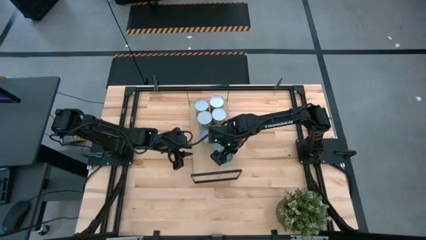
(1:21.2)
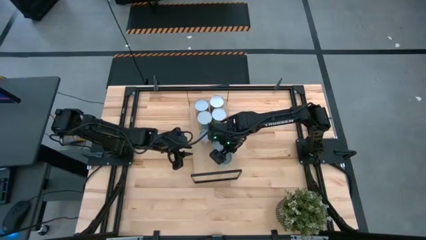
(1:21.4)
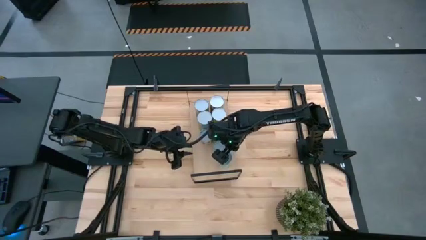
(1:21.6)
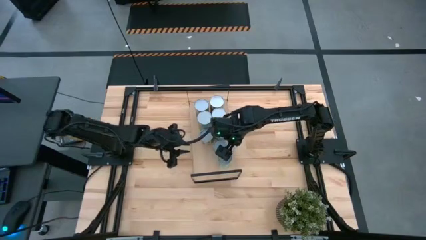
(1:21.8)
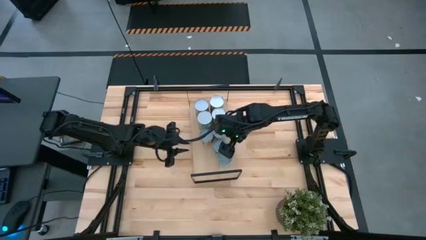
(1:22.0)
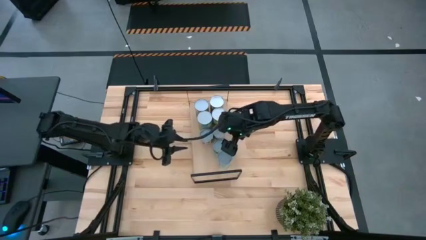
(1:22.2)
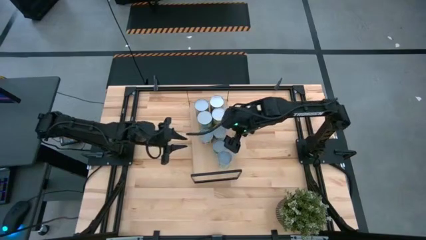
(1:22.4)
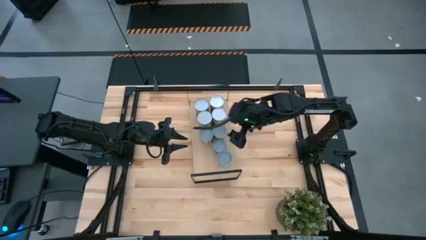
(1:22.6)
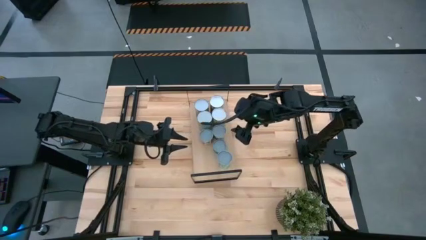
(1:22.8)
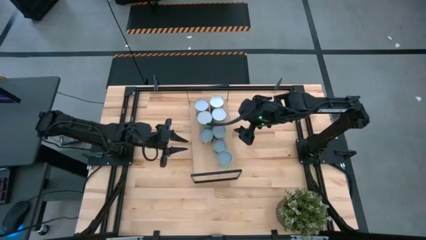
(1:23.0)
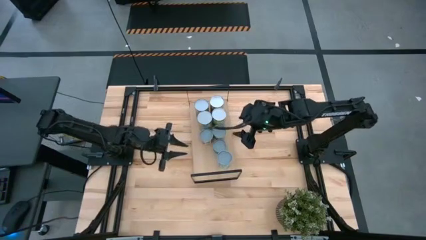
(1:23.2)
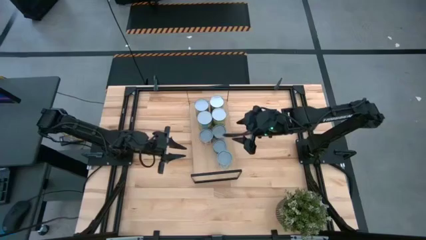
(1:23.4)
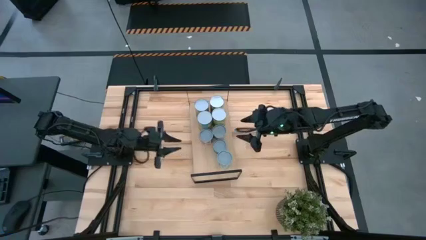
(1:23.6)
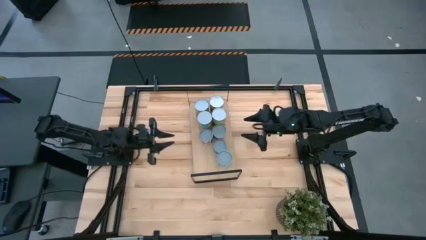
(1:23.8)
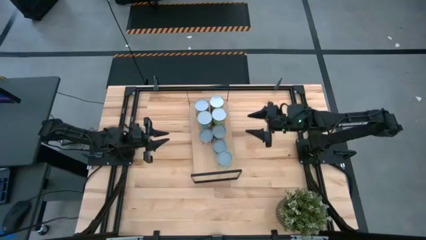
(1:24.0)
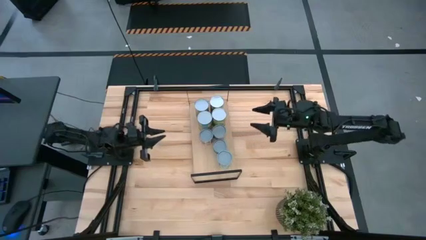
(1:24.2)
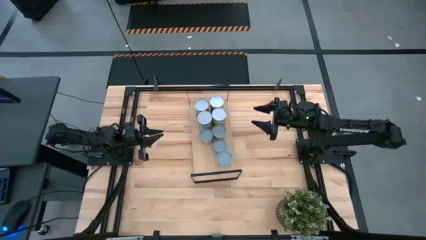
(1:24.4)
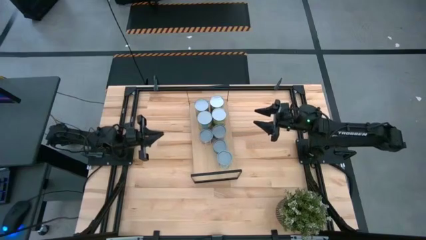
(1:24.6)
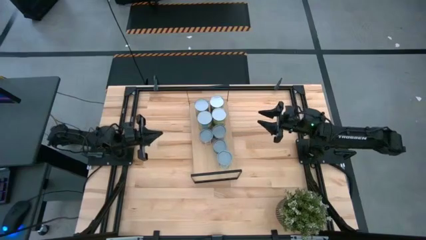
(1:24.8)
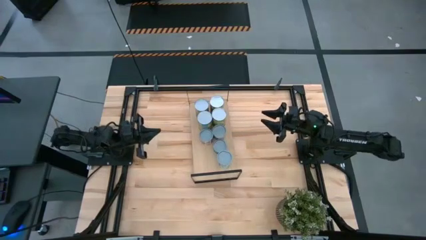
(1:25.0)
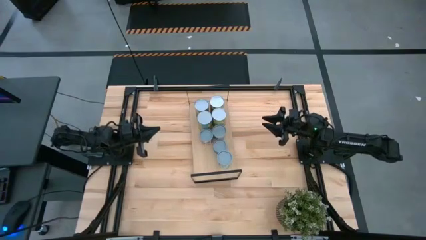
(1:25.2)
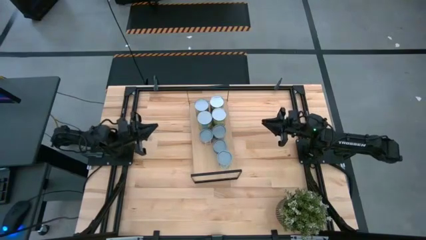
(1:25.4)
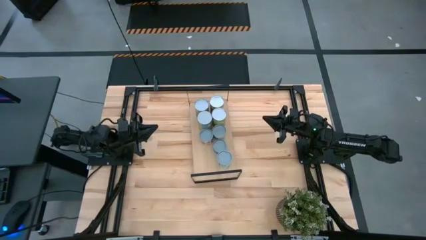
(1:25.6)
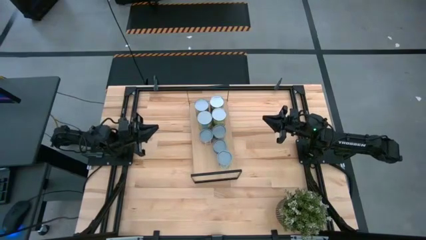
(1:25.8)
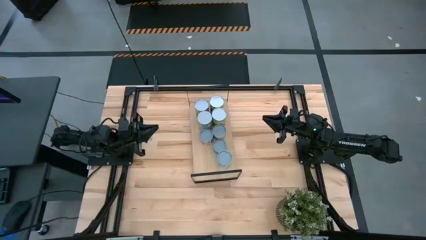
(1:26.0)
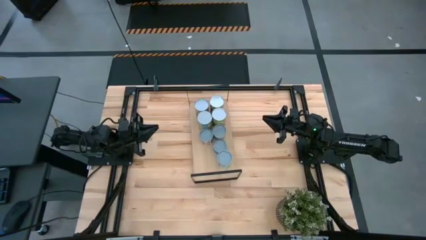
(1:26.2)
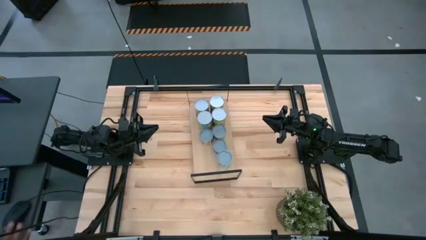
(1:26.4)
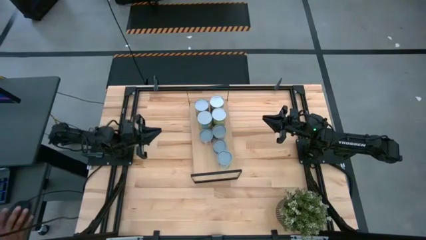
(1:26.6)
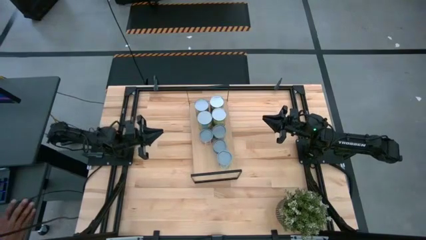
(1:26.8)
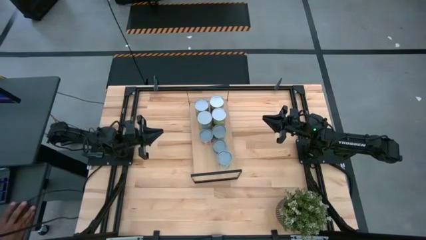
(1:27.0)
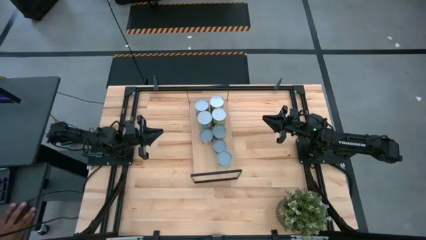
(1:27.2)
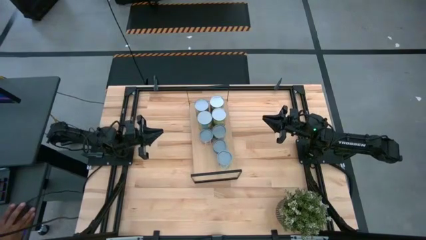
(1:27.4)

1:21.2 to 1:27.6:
Task: Pick and place cans onto a shelf
Return to Home Position

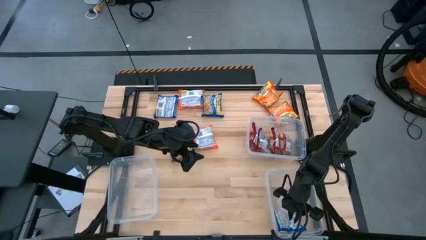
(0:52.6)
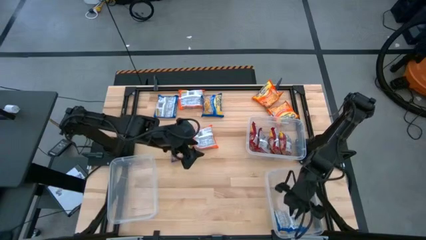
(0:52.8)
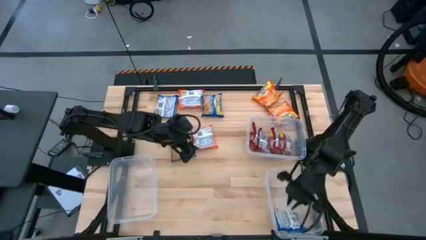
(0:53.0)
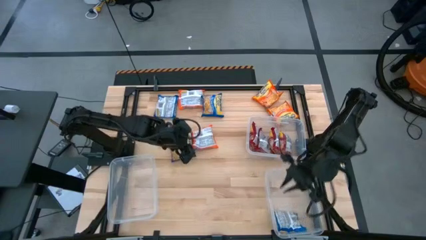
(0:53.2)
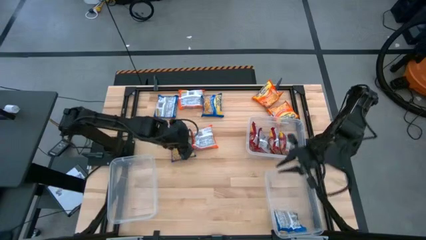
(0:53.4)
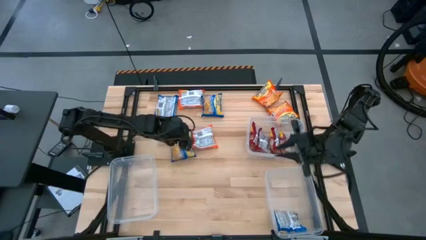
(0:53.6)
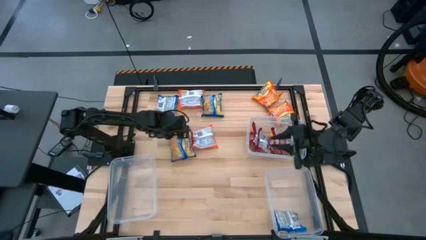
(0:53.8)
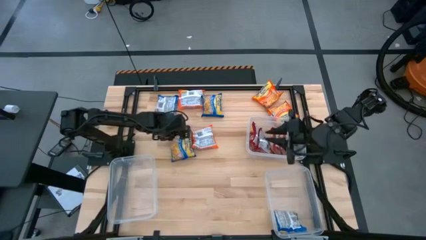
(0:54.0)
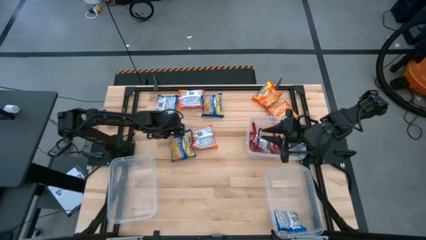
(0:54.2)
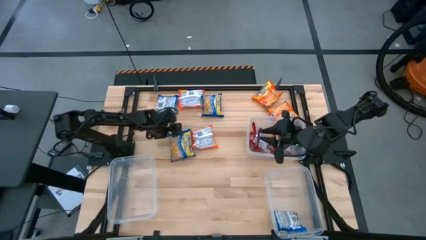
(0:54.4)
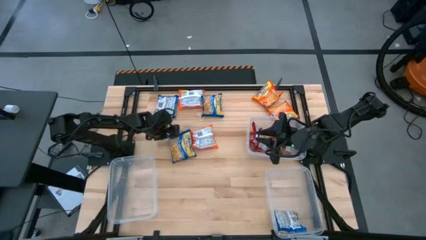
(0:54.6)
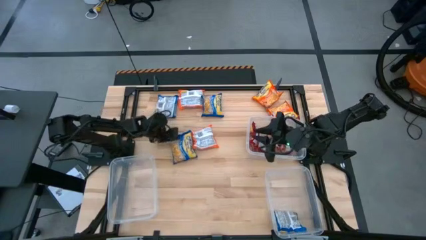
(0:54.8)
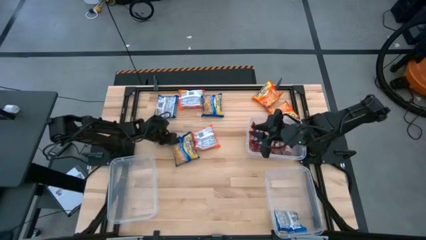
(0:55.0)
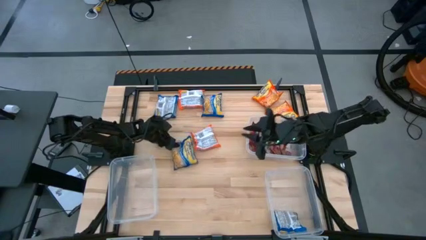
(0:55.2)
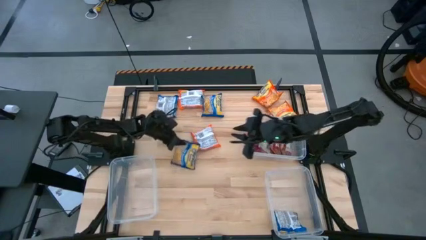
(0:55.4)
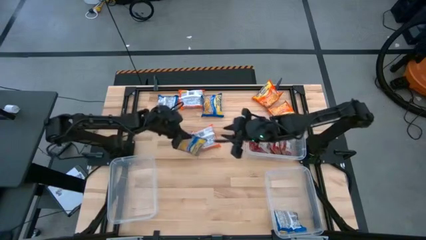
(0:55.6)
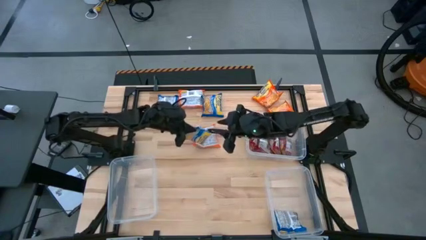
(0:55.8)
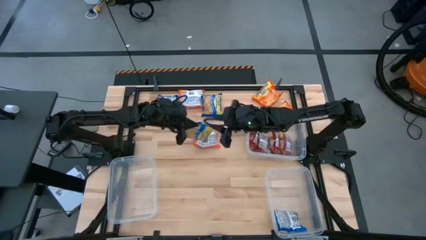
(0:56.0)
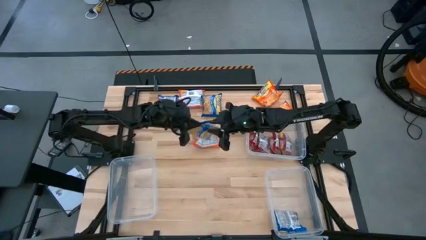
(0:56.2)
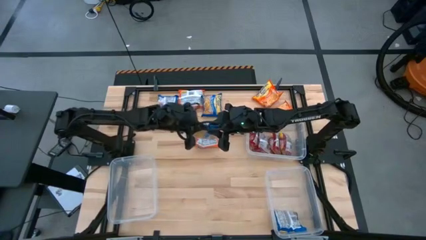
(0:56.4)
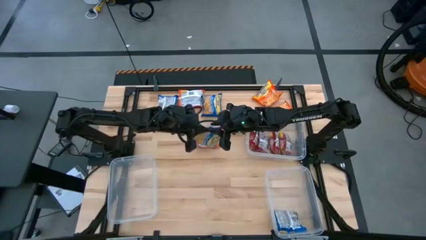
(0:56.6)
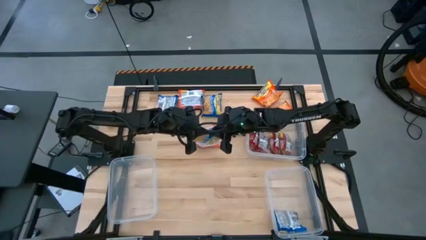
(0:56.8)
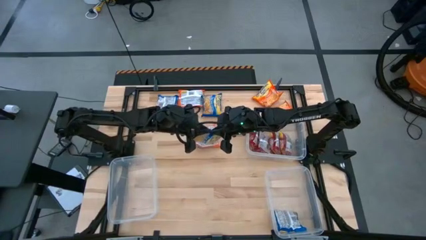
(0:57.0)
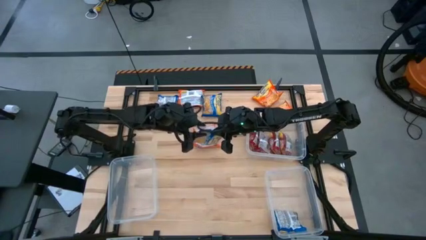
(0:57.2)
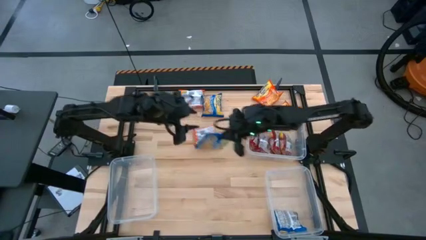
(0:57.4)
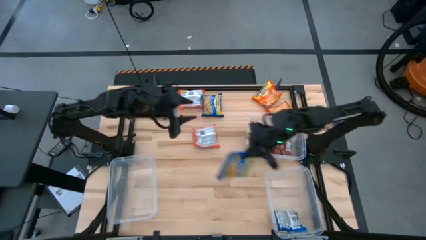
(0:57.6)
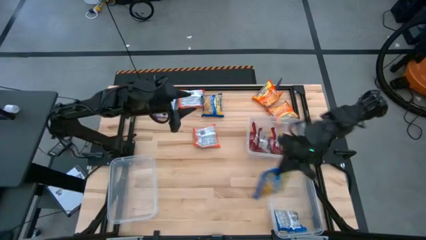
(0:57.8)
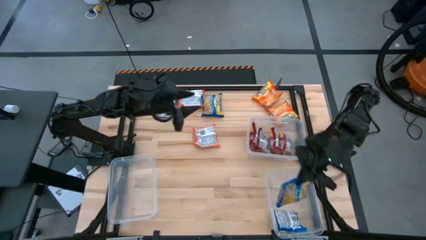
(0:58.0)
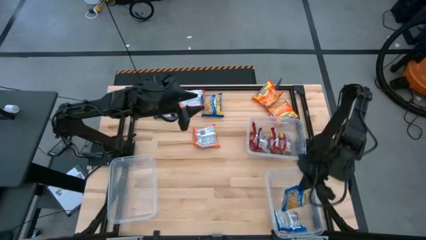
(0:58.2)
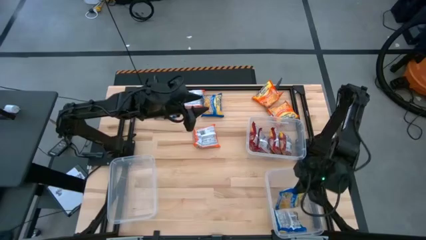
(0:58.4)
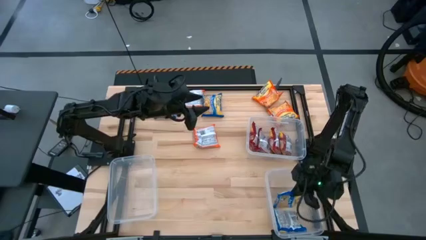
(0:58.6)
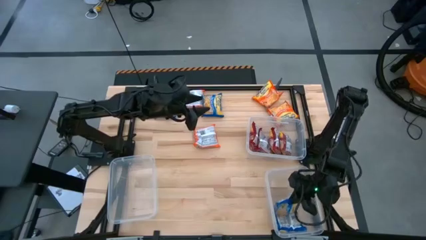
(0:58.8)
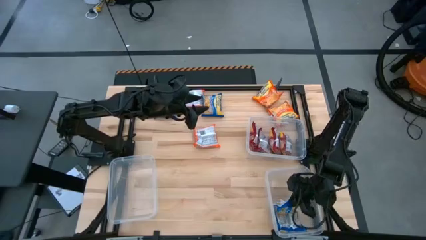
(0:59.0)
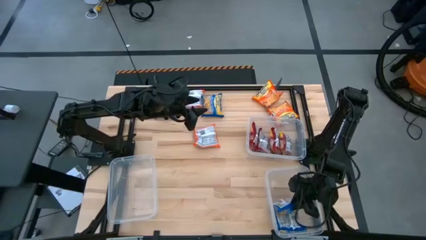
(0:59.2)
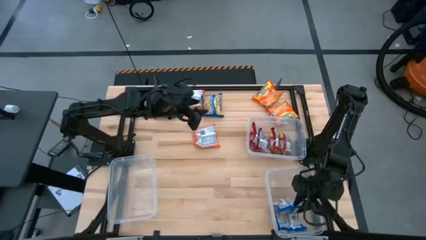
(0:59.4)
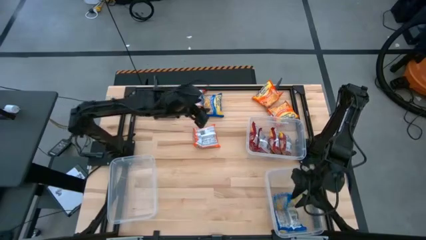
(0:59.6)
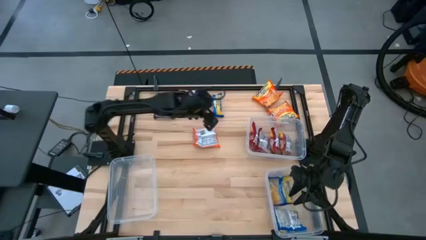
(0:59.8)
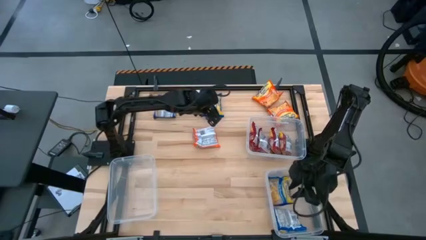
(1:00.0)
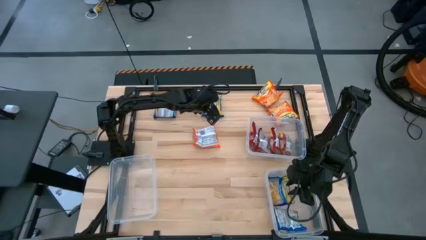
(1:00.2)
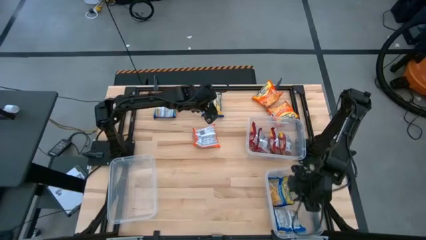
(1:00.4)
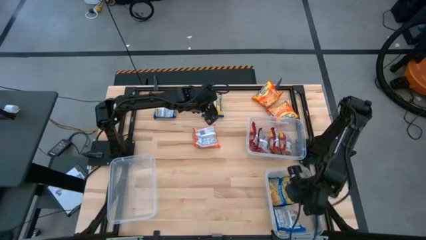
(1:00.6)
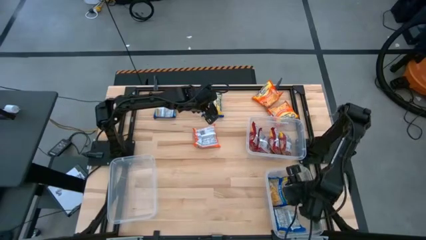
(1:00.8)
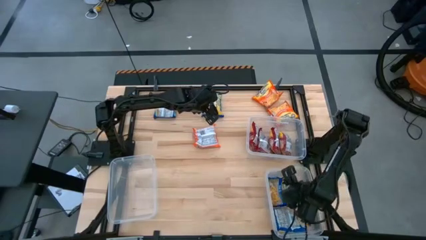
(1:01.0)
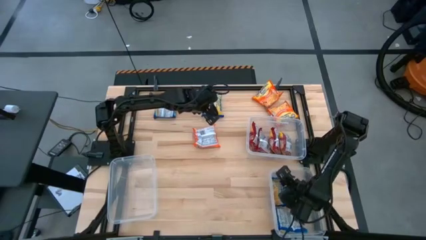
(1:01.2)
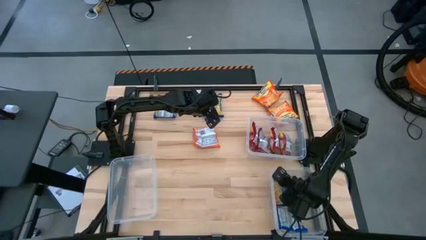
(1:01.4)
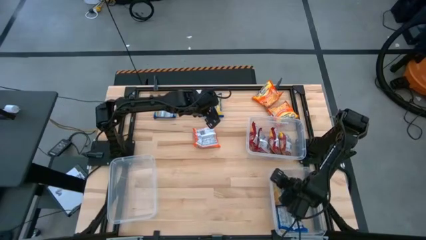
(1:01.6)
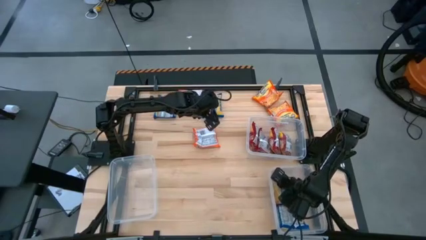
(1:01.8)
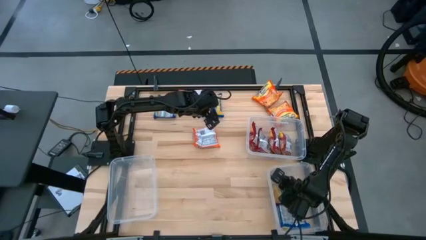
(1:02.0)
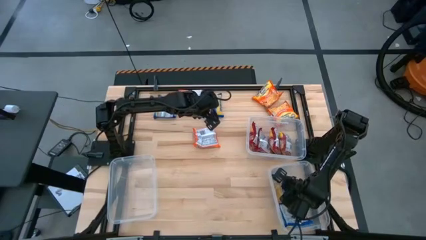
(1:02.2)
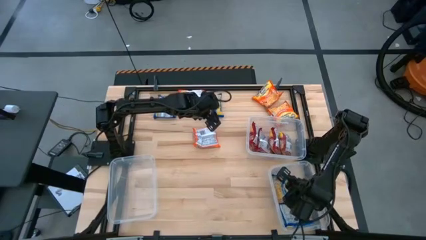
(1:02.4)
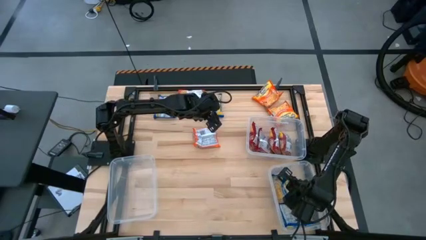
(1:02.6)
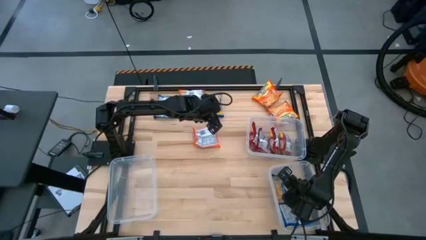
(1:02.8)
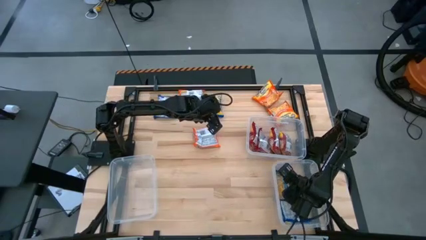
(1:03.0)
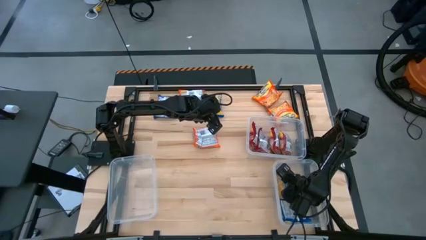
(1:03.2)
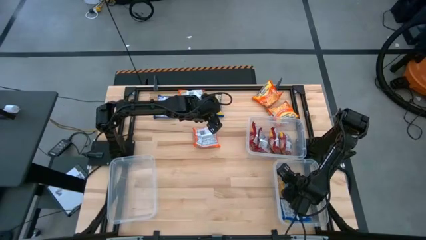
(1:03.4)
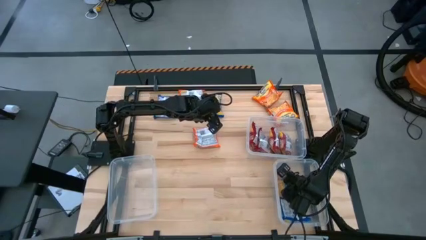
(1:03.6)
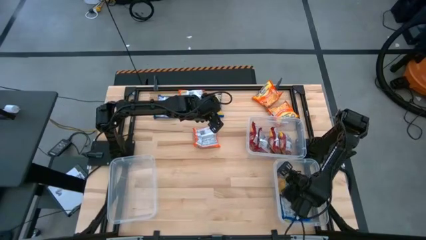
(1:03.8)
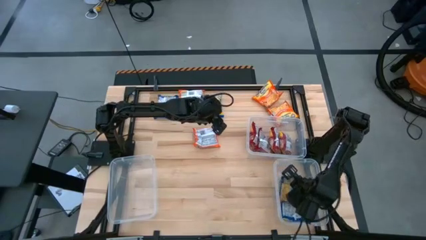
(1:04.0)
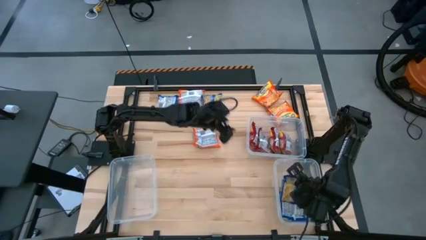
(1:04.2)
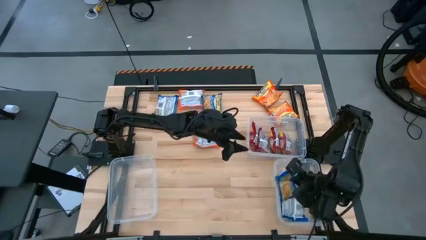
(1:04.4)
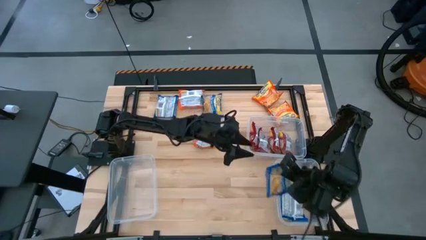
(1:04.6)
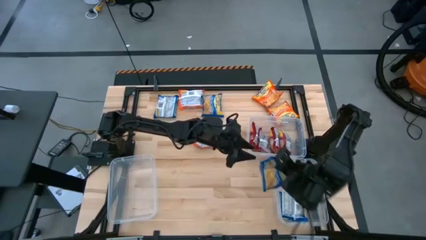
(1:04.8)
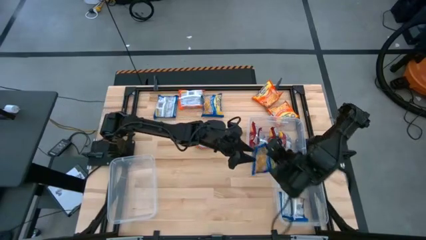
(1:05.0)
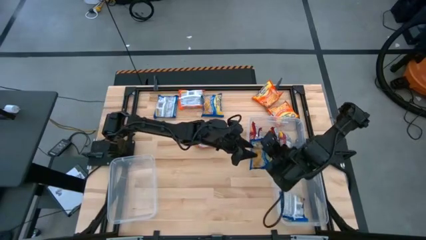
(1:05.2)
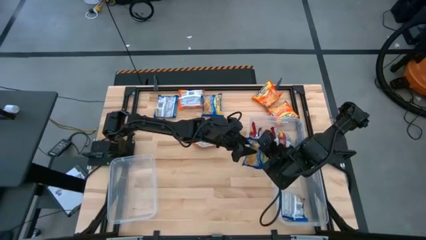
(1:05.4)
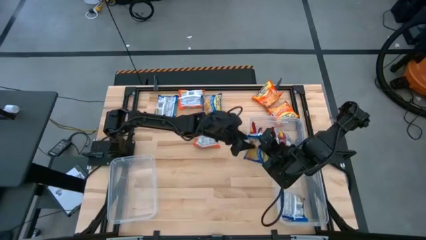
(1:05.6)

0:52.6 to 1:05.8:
Task: Sort Maruchan noodles
Put the blue noodle pack into the bottom right container
